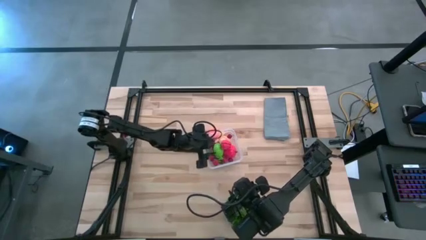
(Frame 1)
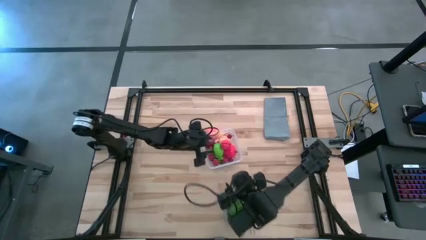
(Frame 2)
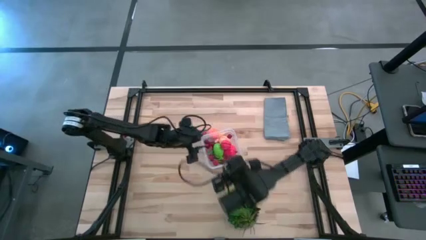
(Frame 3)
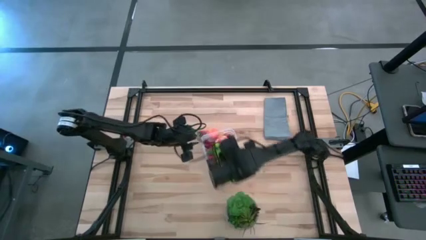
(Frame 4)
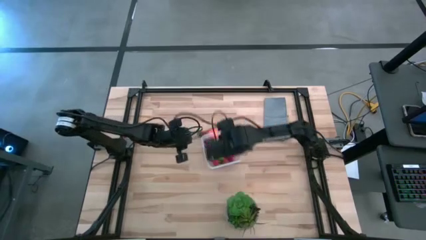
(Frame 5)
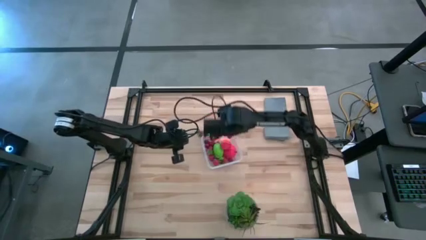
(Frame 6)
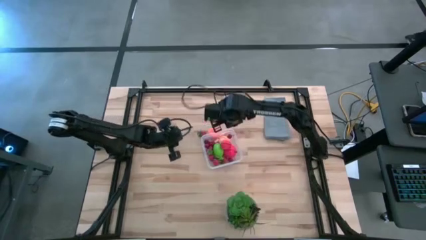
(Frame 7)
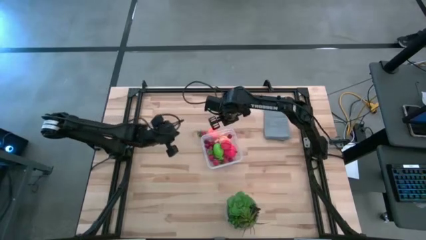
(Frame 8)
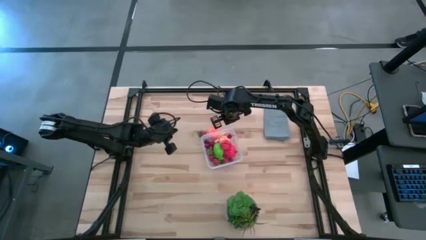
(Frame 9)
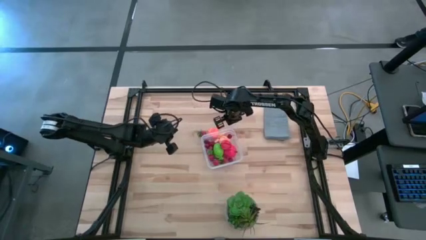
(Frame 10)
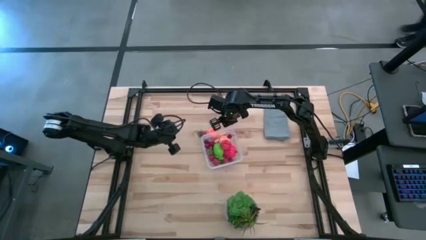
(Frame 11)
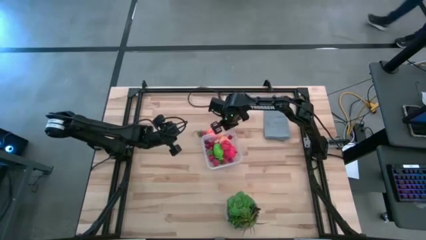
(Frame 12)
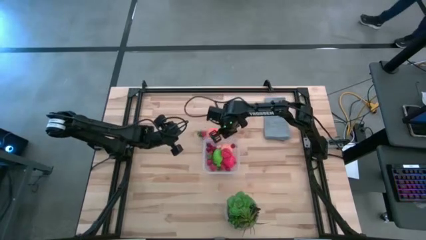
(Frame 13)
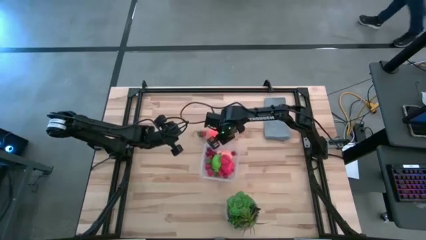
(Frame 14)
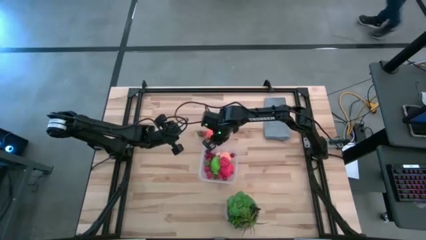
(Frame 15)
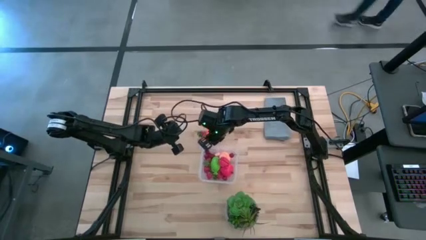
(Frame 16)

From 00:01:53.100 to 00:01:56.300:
Task: Pick and placing Produce into tupperware
Adjust the transparent container

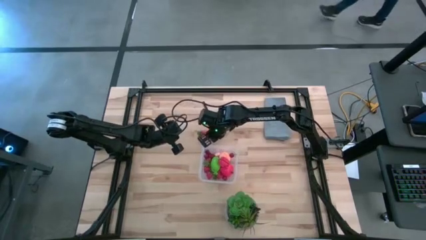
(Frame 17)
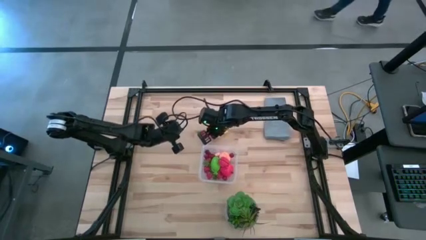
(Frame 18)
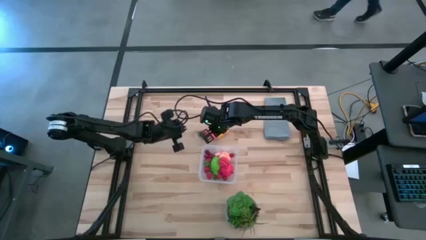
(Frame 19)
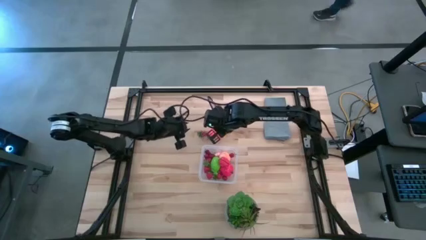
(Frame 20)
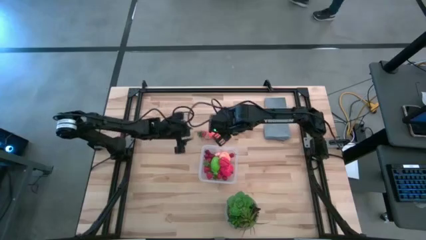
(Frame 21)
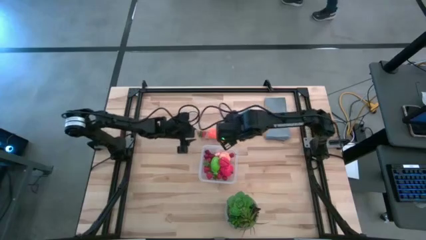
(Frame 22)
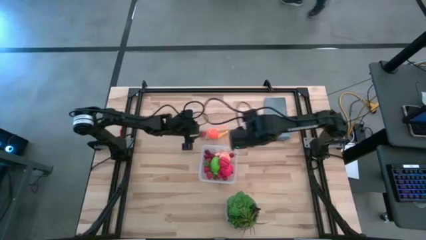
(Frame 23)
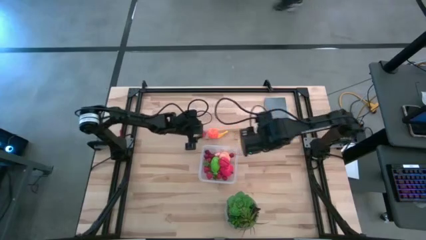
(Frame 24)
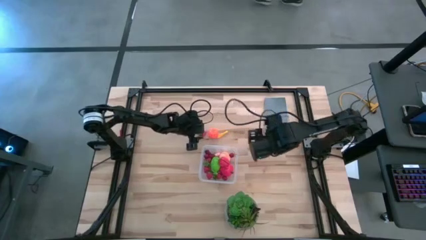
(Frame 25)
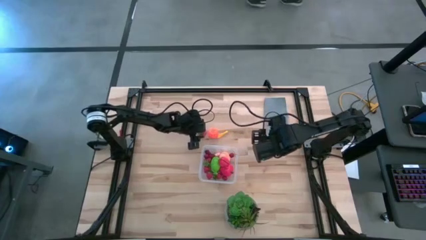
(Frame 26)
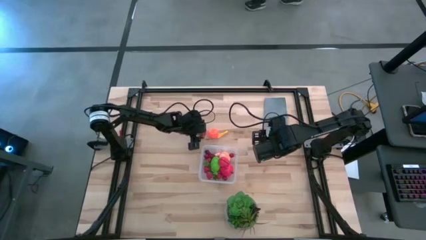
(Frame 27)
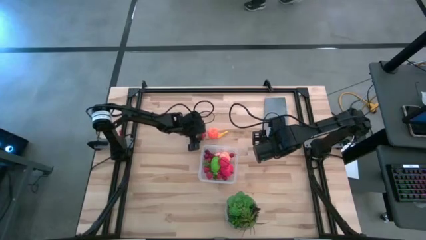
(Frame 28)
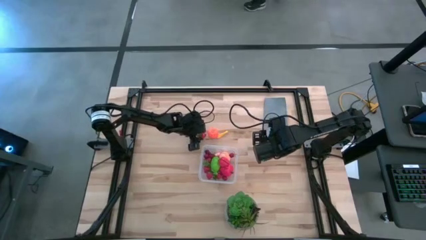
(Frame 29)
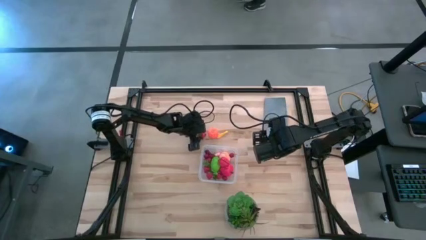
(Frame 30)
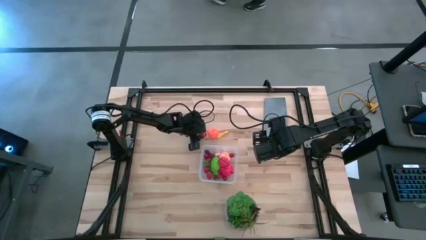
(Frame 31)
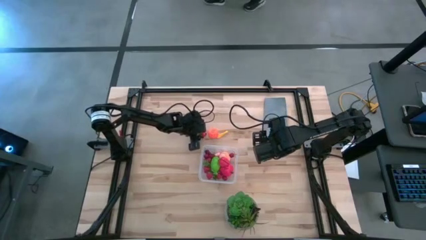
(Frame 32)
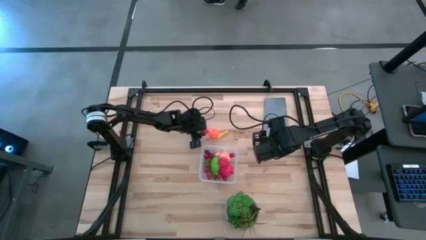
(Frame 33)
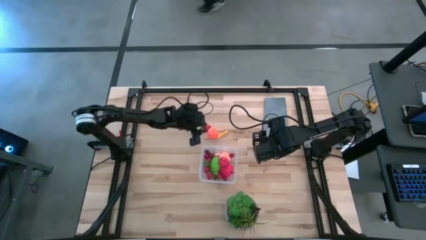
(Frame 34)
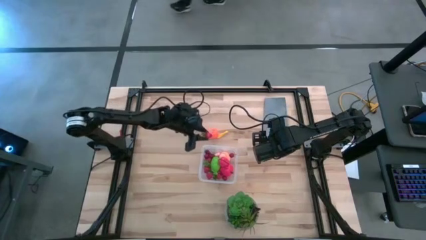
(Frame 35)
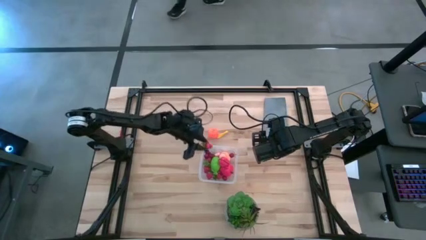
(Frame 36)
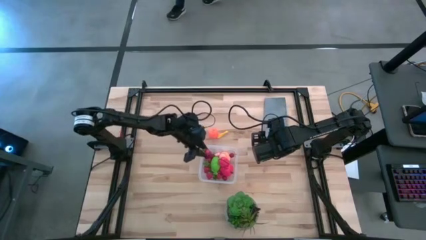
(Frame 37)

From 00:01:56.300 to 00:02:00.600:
Put the red strawberry into the transparent container

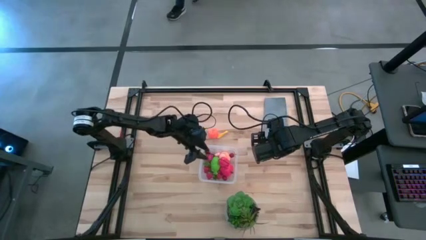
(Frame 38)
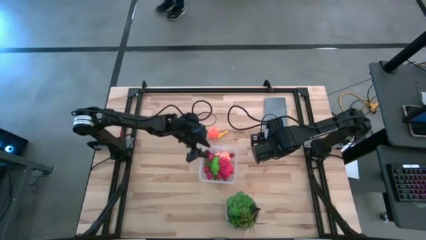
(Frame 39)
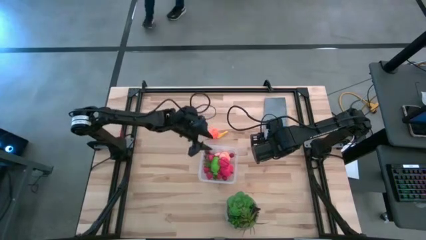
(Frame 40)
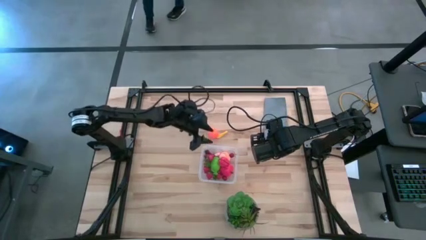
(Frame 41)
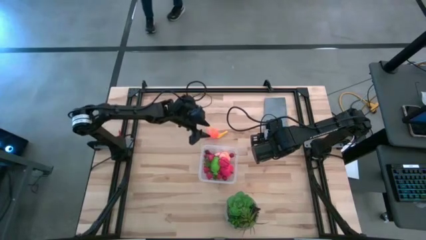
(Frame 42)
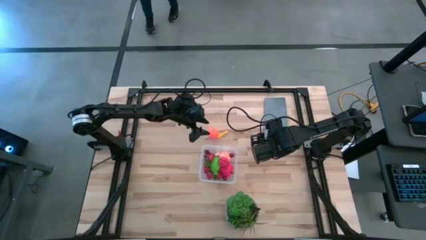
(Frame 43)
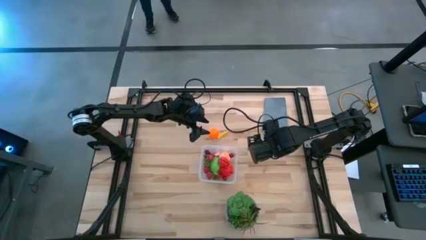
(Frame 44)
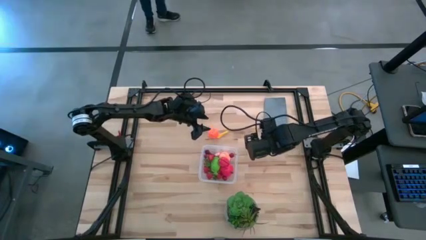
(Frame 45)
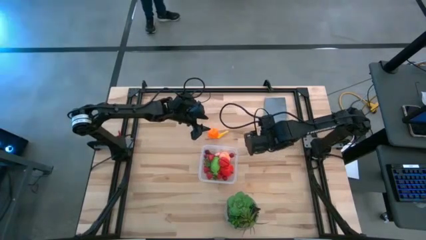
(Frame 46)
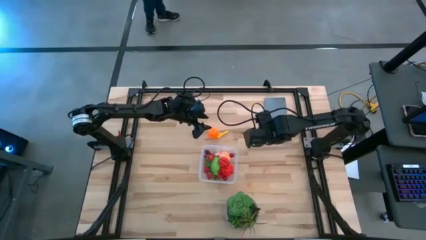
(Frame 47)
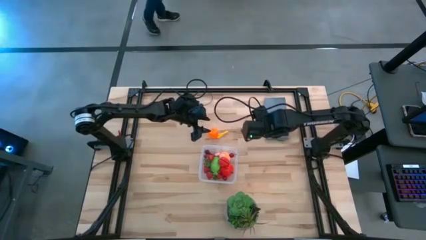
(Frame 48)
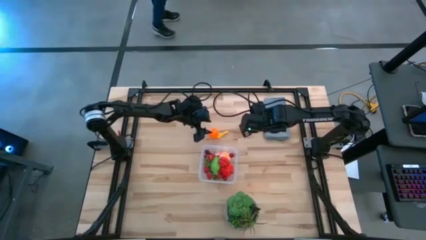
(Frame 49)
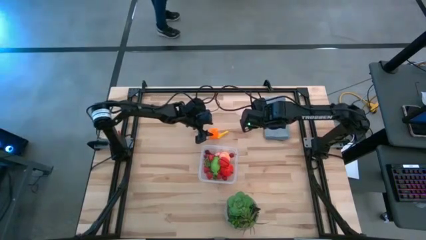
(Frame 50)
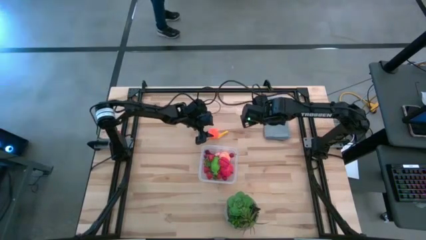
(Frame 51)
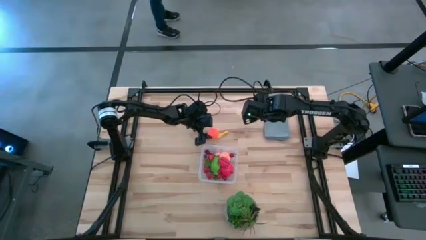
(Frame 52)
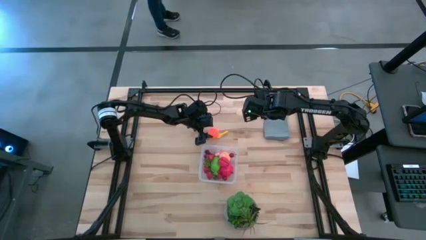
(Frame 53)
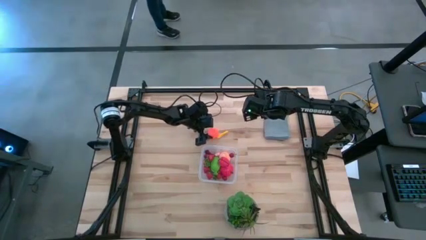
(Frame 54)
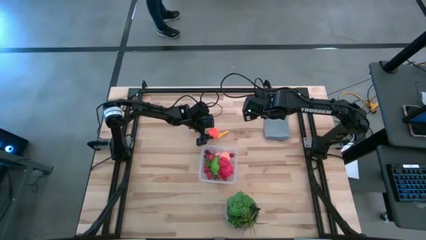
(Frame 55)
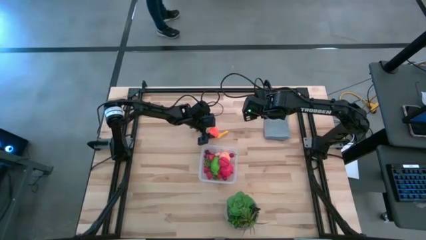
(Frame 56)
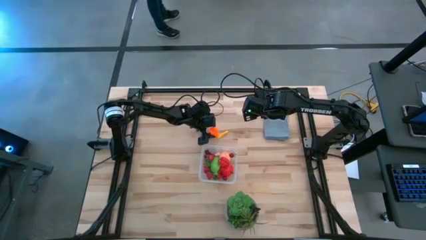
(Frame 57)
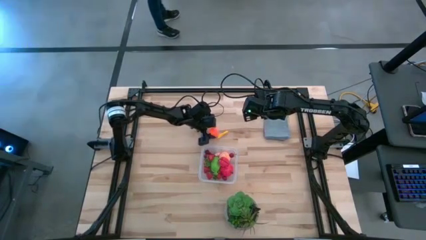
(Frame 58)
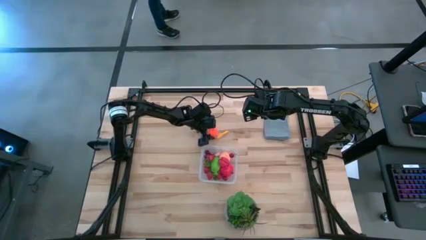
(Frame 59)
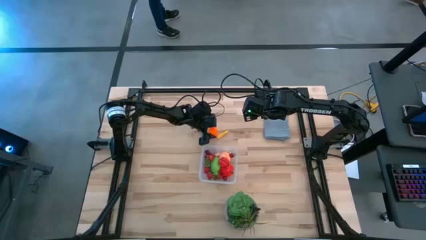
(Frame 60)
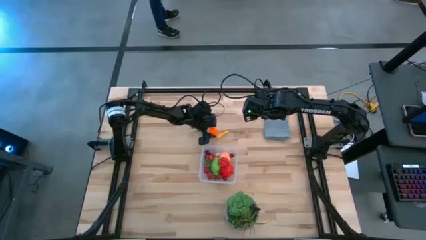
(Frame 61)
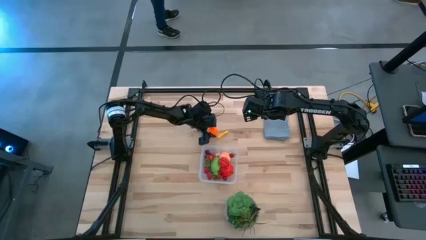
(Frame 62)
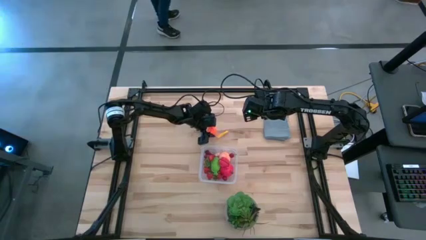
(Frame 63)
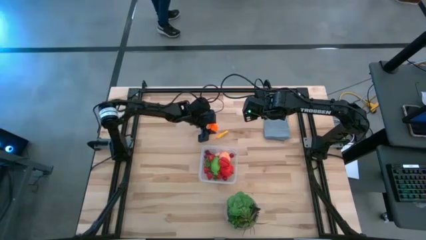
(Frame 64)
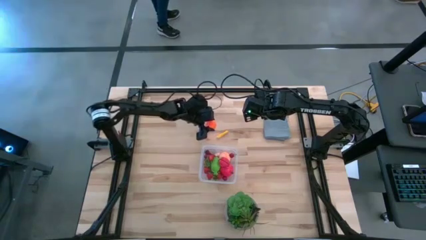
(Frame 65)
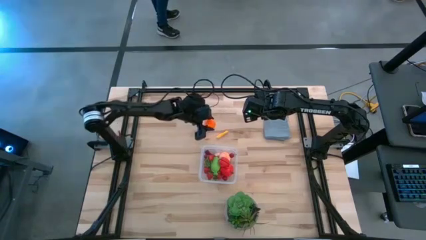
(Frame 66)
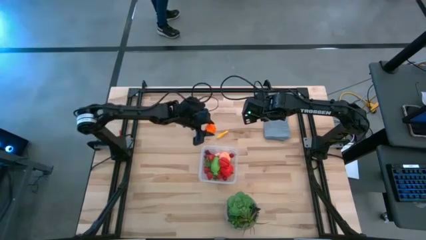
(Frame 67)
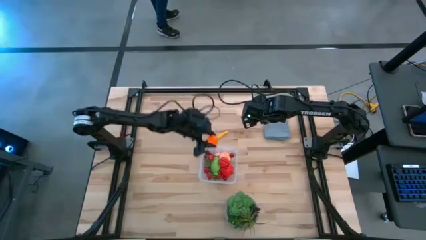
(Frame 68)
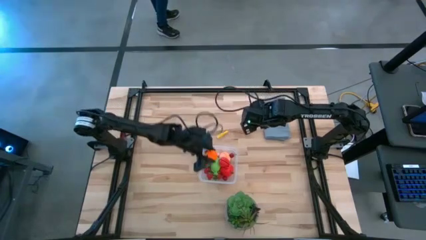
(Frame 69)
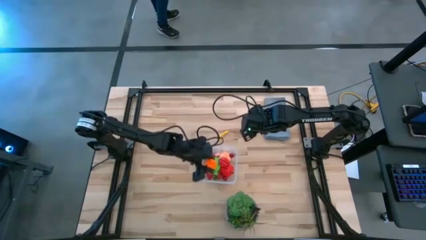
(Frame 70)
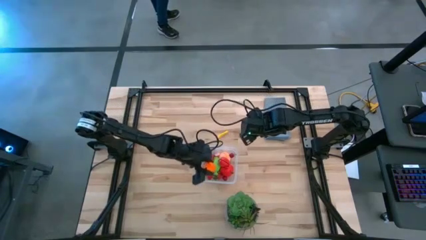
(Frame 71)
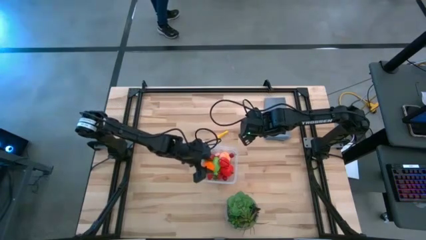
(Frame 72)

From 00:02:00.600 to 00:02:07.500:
Put the orange pumpkin into the transparent container

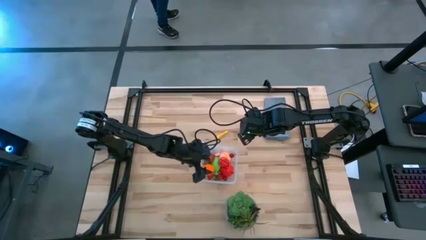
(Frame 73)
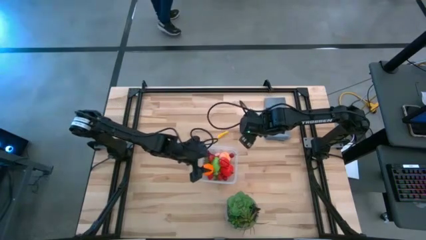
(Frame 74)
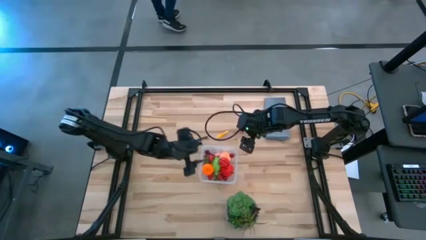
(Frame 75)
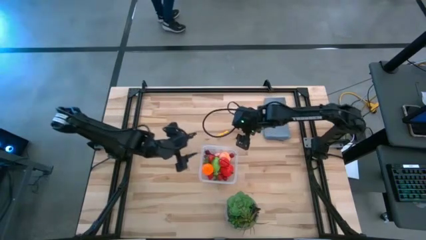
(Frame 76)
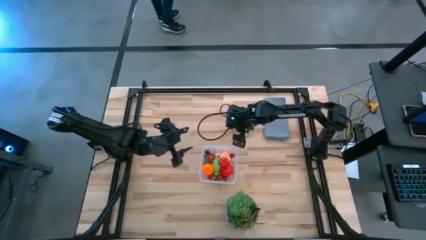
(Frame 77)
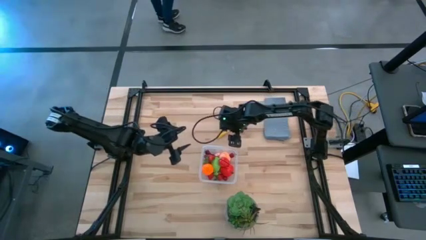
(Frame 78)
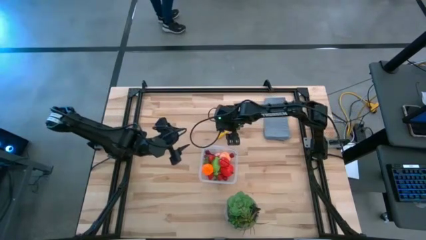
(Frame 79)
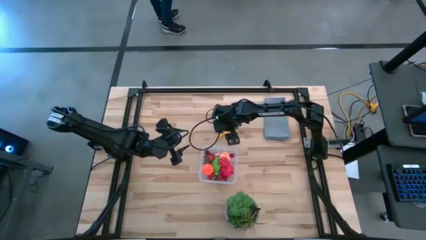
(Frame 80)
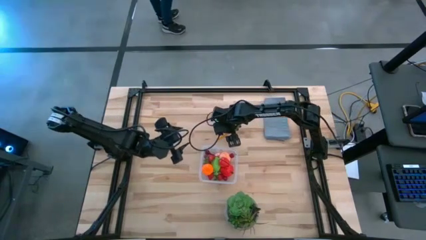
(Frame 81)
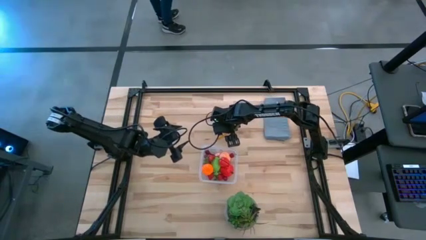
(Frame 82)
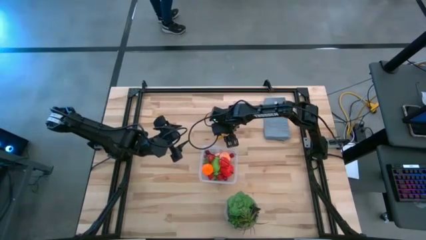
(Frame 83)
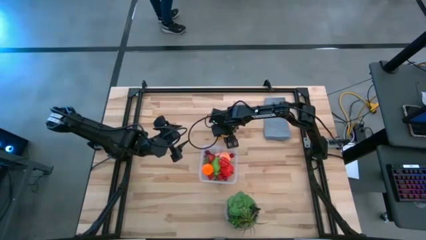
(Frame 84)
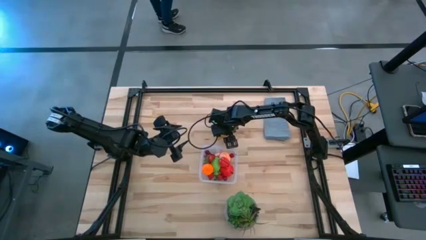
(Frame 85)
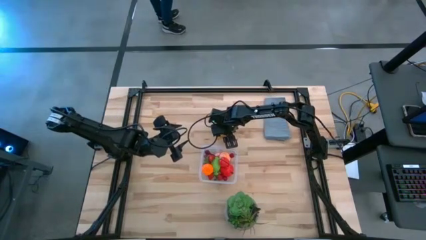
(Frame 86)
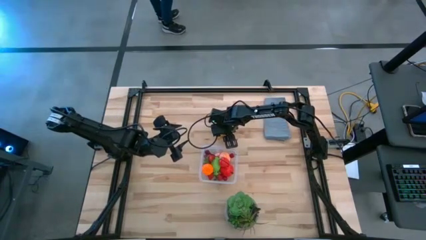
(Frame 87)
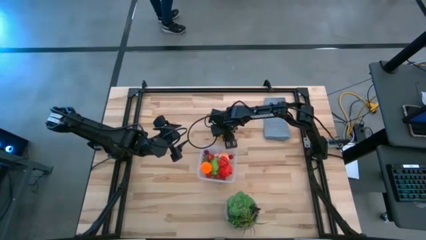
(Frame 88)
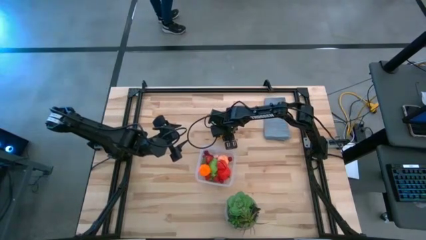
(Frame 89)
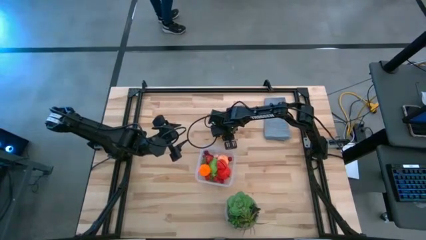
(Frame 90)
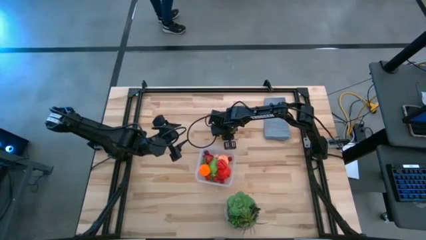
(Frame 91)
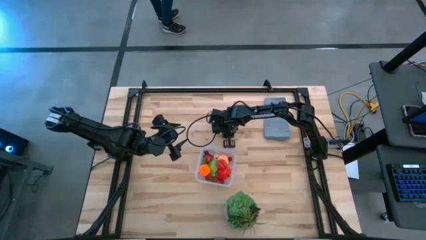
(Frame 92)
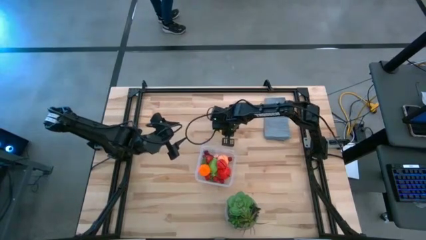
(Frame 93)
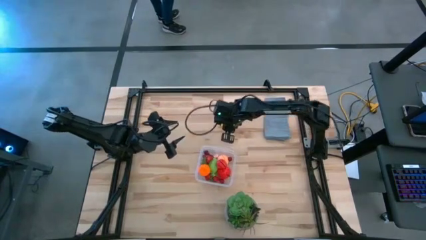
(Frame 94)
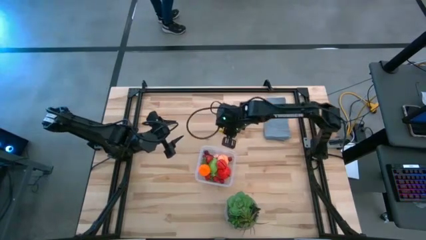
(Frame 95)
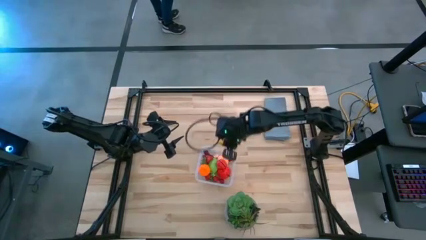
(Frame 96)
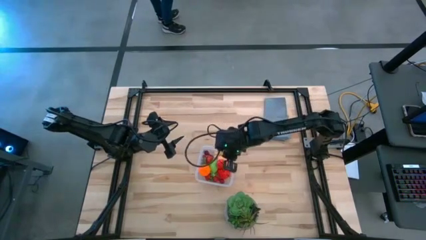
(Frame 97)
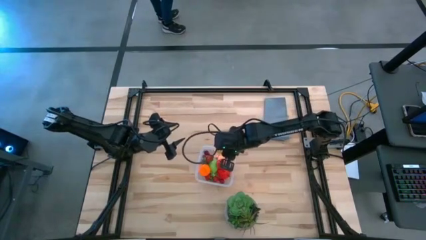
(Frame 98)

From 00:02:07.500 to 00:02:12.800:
Put the yellow corn into the transparent container
